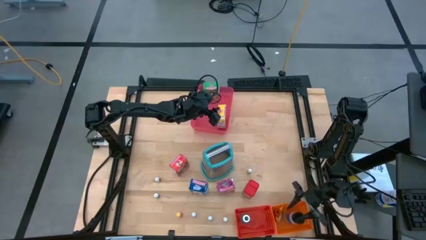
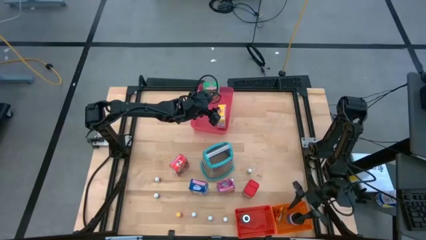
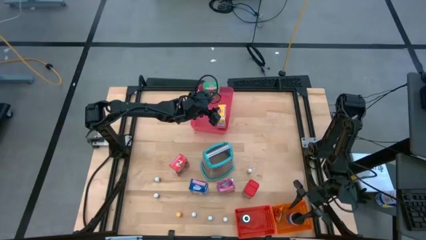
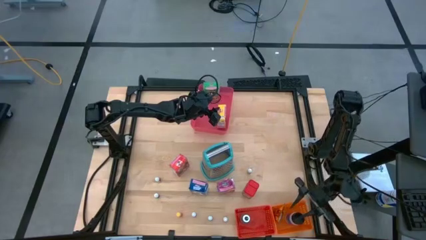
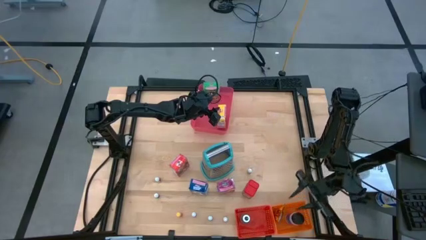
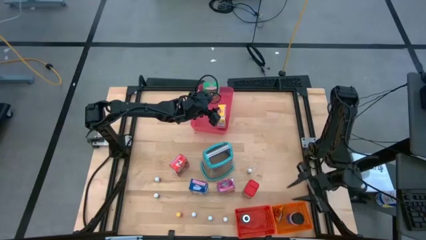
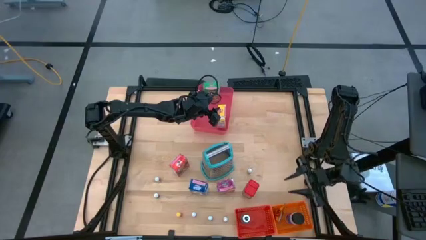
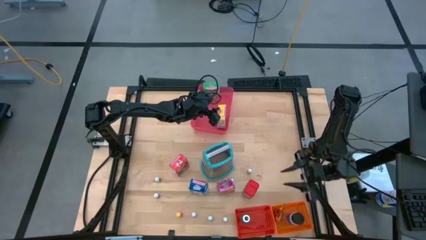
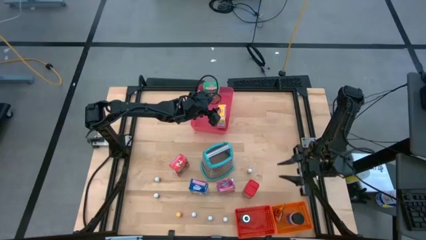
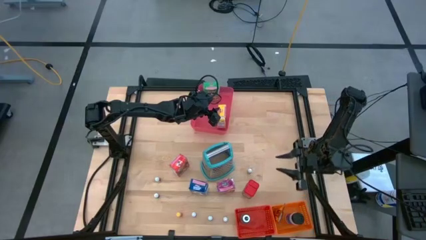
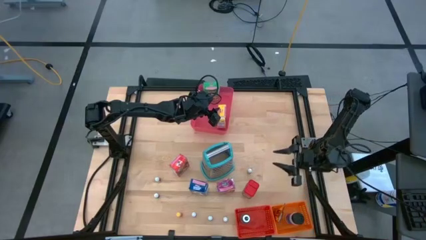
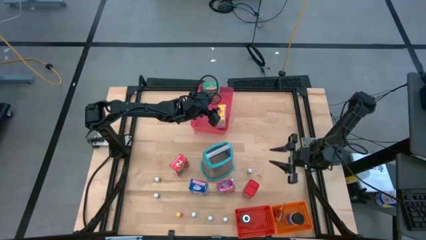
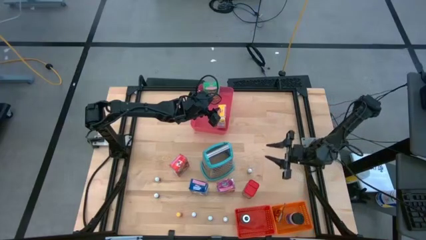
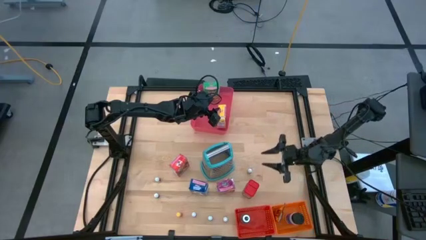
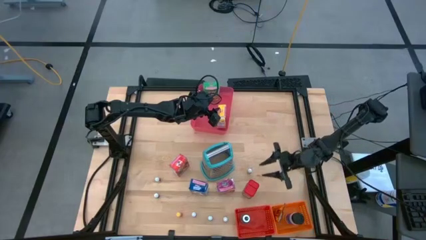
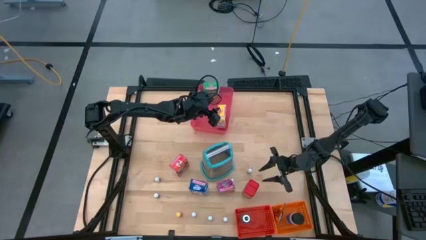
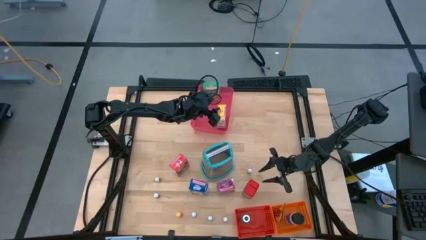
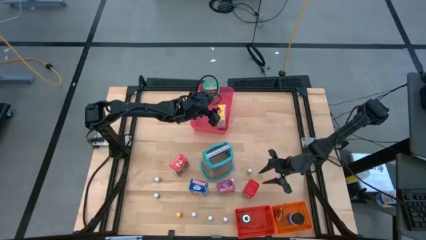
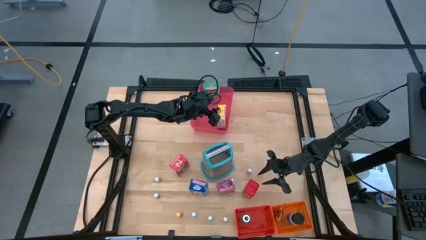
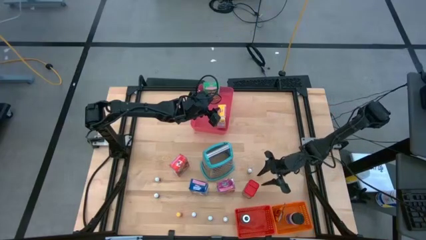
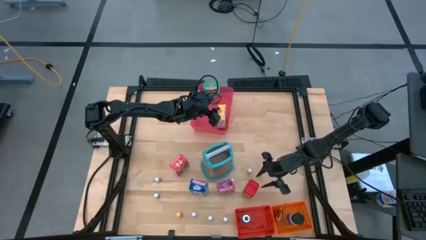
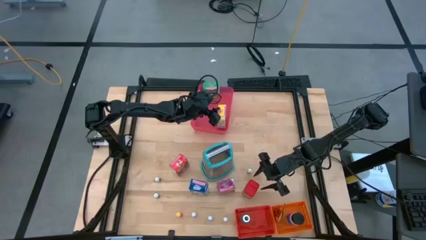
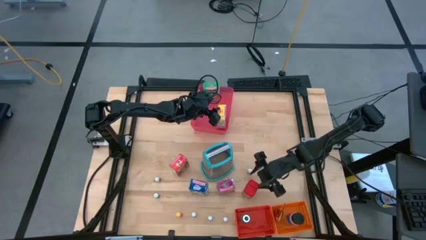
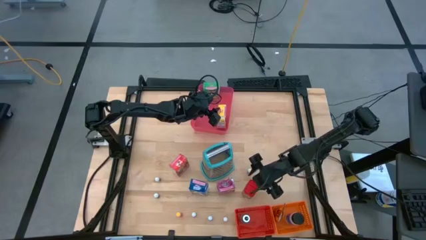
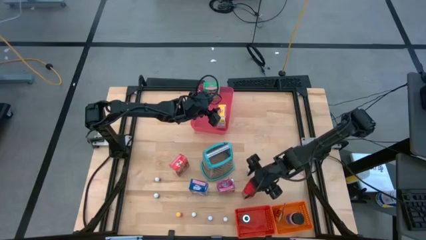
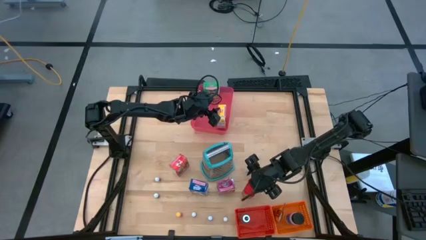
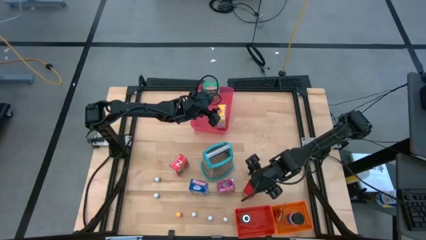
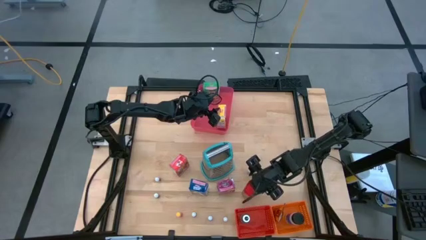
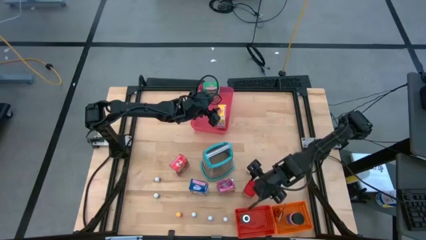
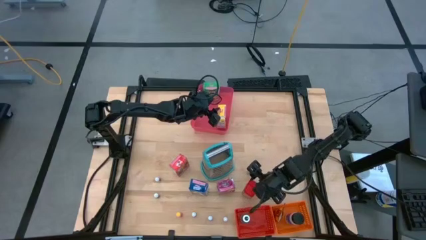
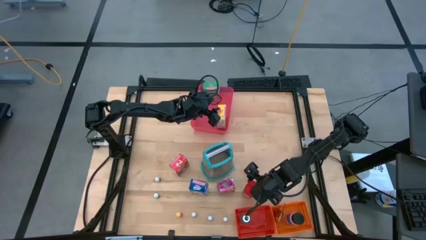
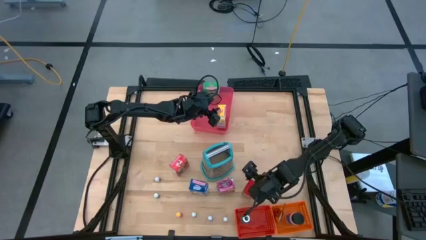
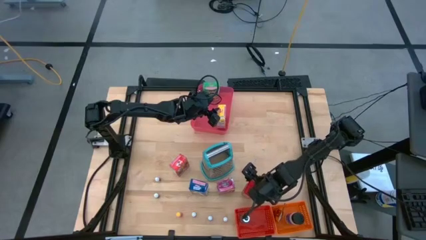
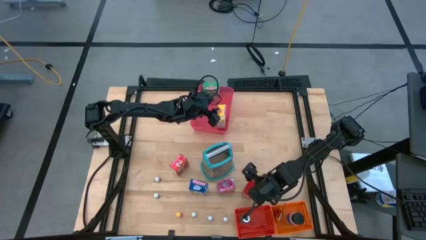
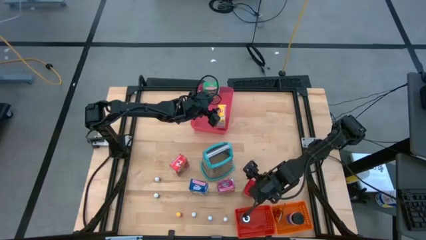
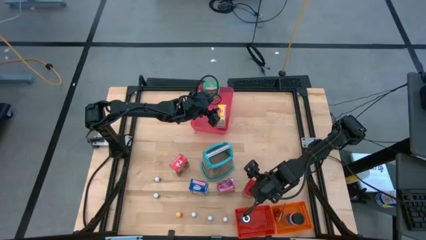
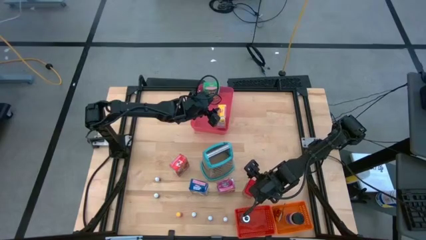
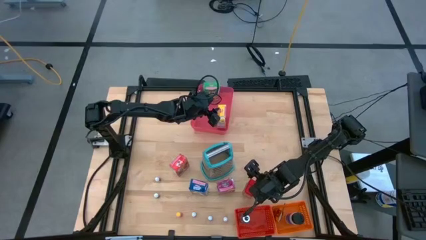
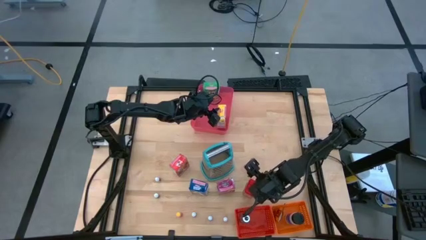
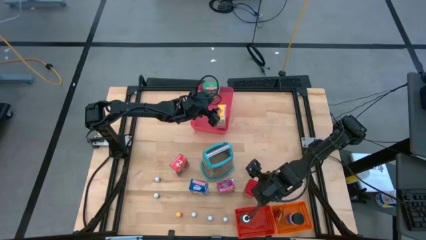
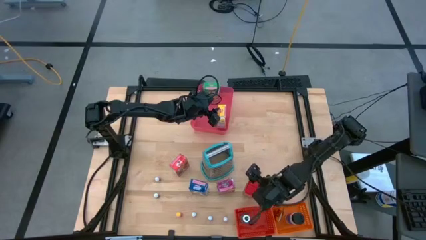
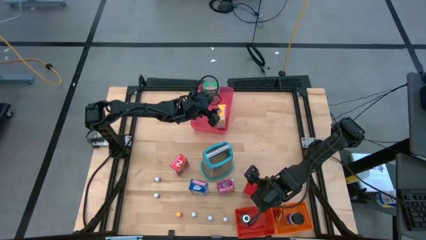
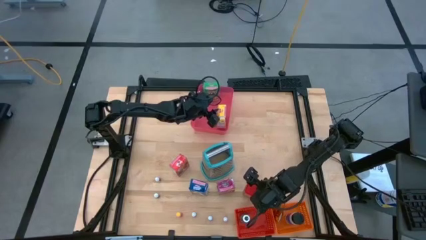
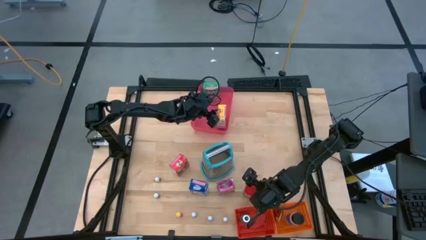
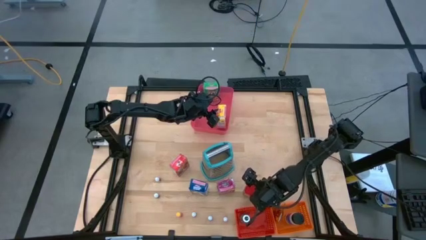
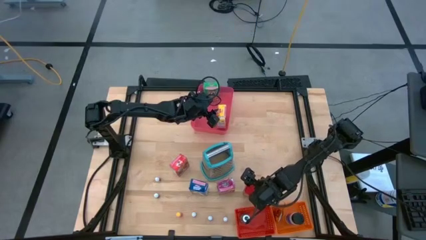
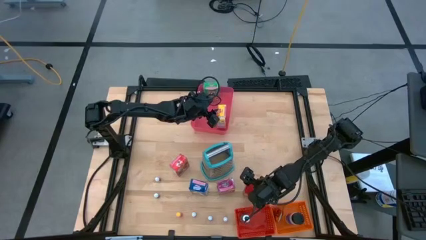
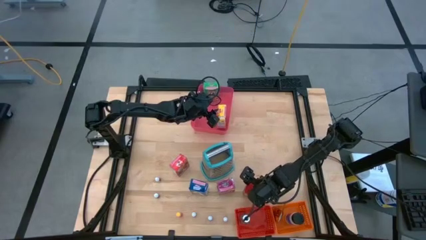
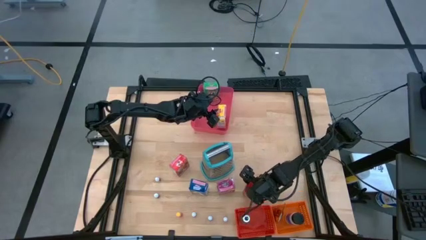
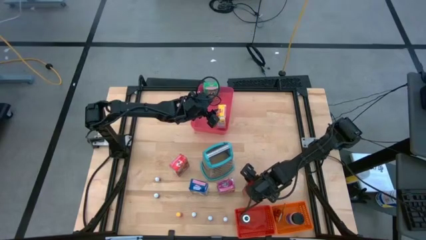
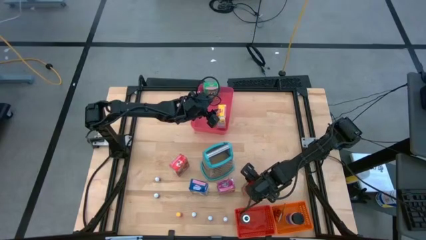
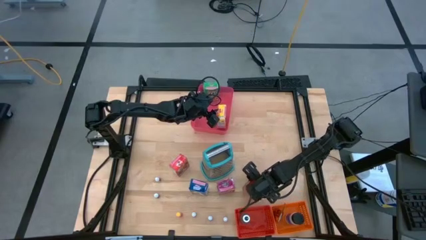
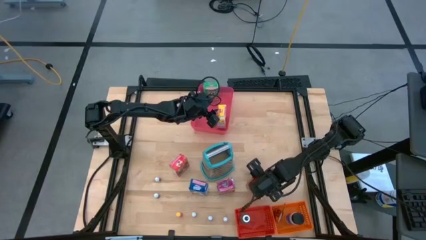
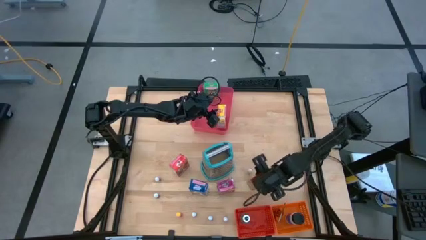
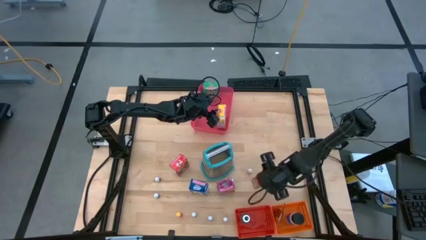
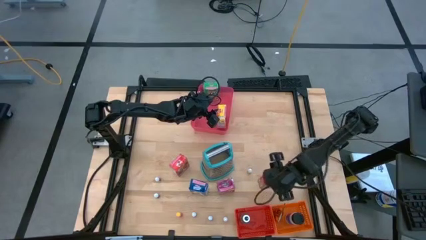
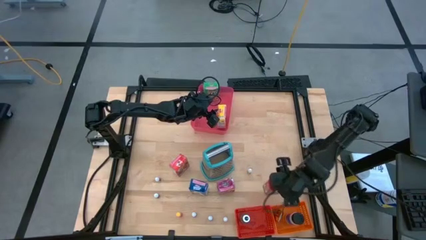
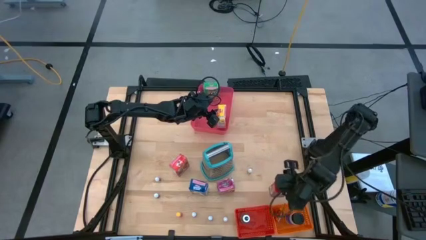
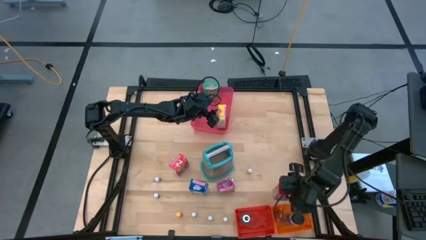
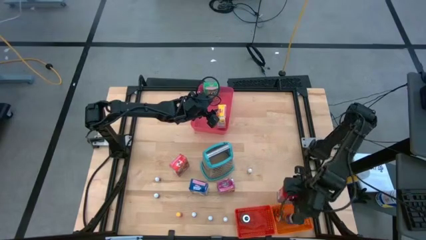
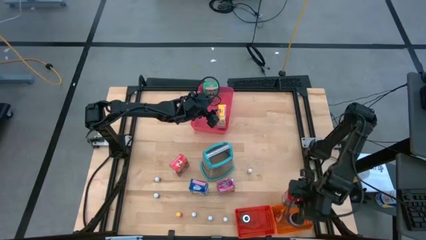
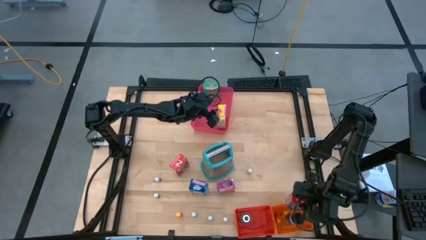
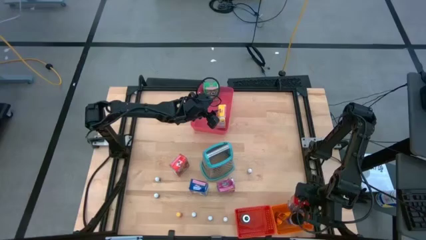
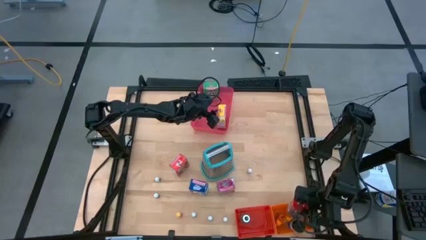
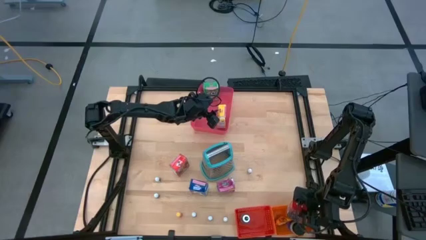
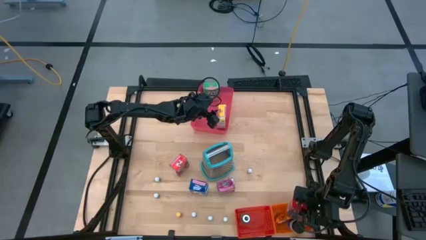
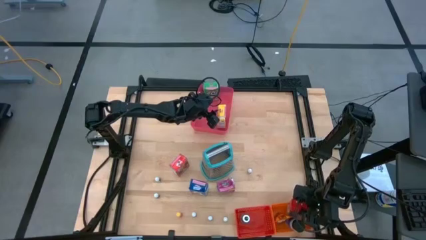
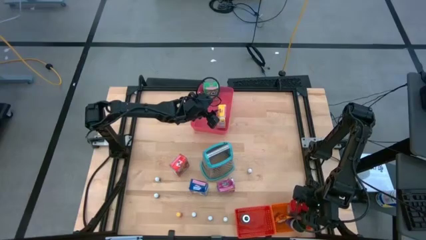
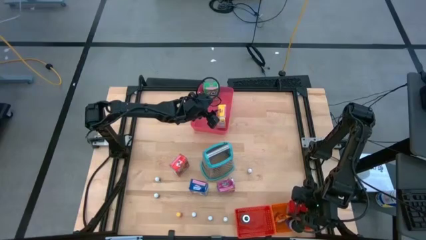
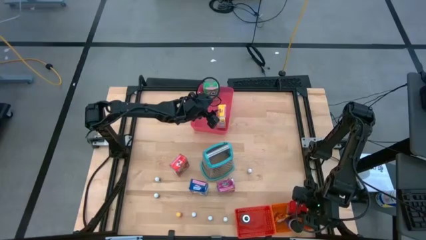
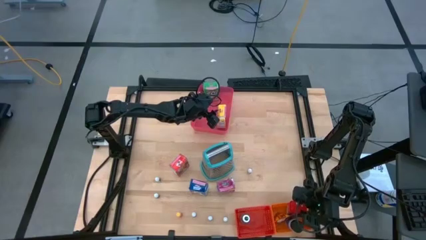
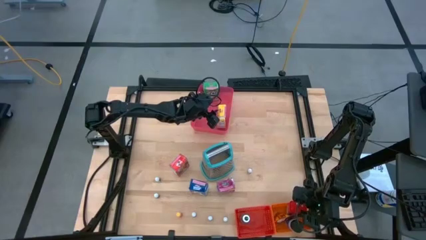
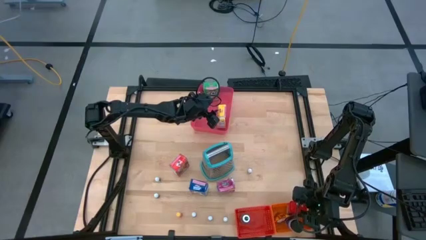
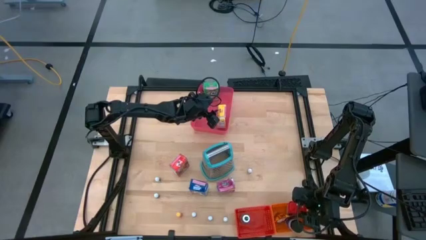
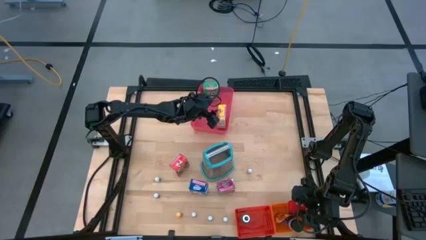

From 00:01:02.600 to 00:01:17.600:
Task: Pick & Place Kitchen Items
Put the red seasoning can into the orange bin
